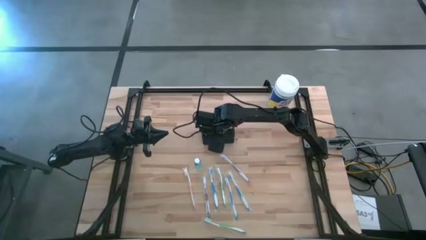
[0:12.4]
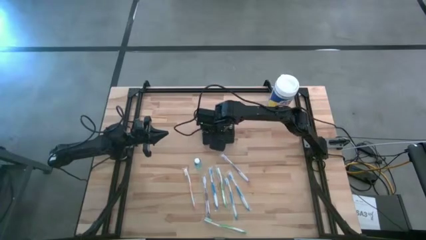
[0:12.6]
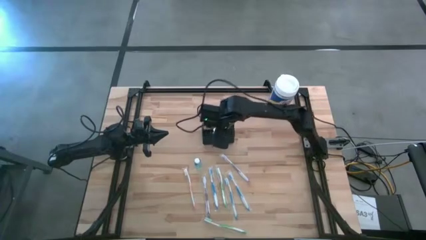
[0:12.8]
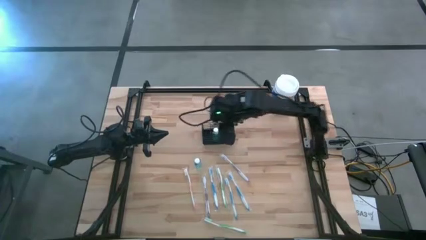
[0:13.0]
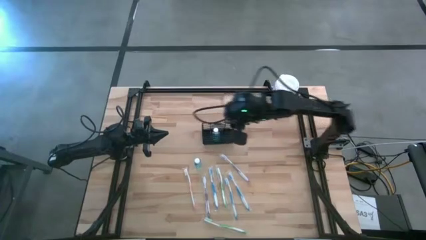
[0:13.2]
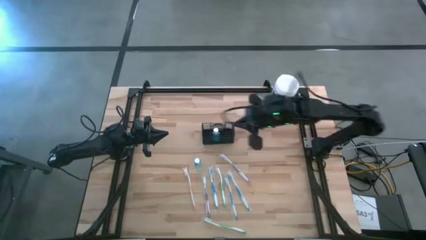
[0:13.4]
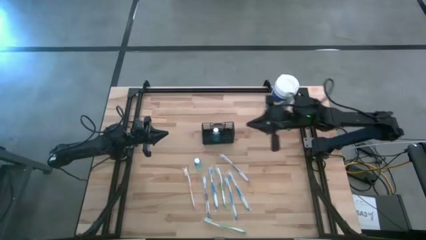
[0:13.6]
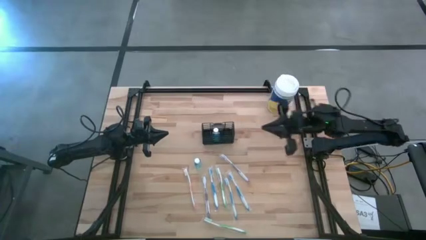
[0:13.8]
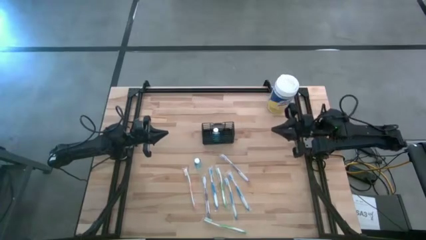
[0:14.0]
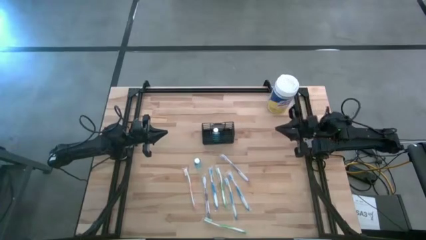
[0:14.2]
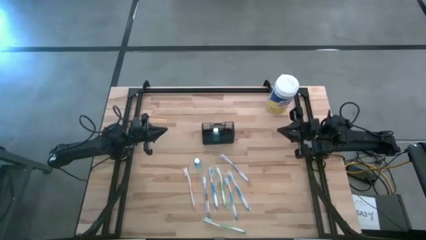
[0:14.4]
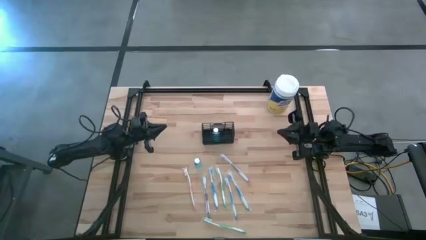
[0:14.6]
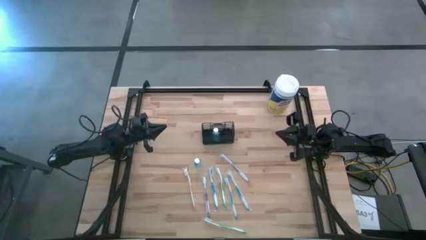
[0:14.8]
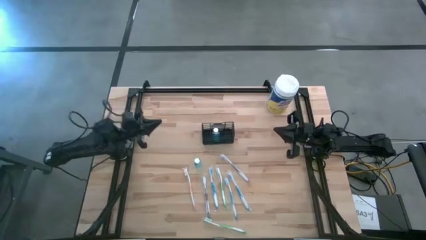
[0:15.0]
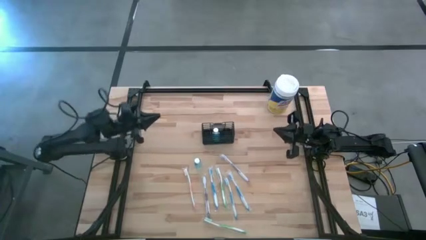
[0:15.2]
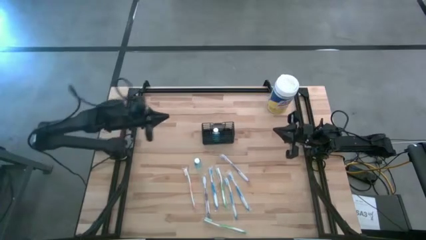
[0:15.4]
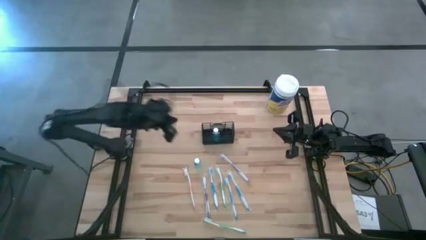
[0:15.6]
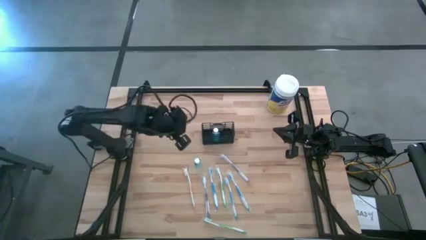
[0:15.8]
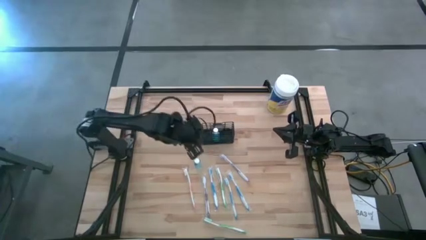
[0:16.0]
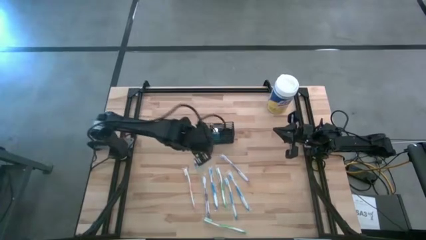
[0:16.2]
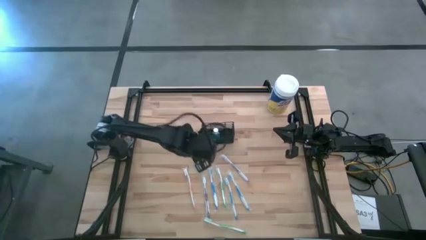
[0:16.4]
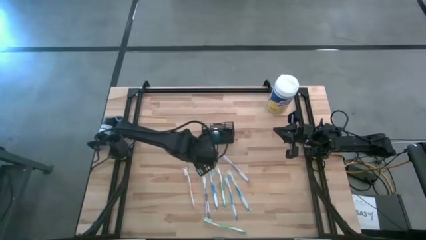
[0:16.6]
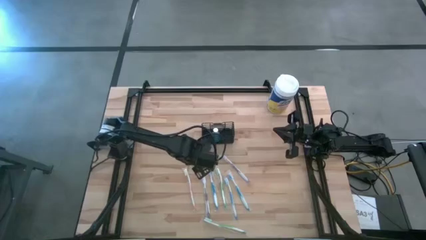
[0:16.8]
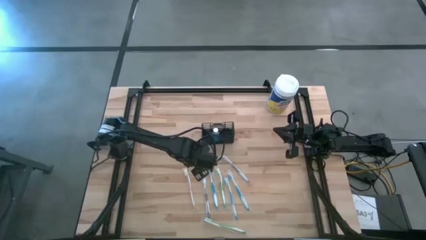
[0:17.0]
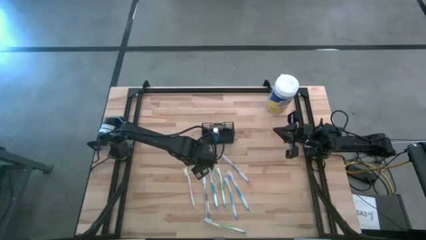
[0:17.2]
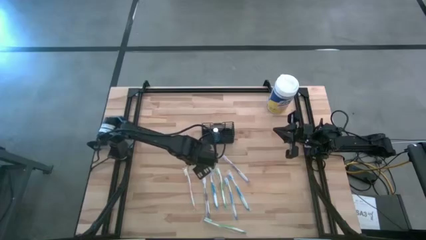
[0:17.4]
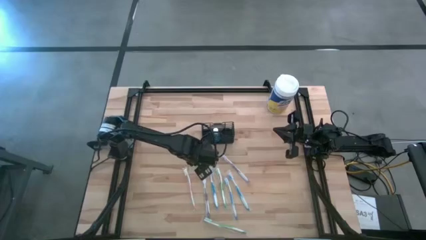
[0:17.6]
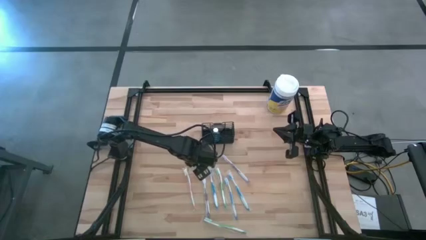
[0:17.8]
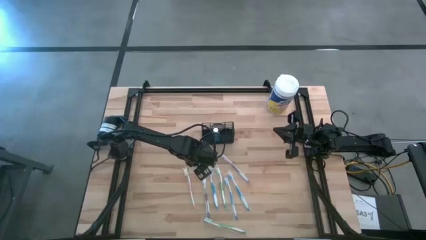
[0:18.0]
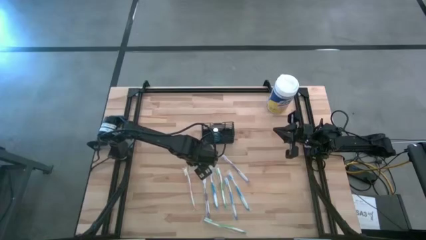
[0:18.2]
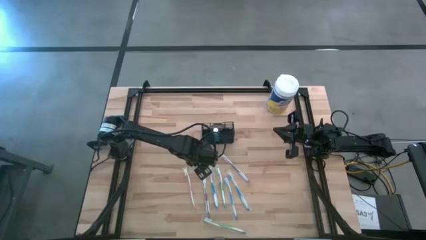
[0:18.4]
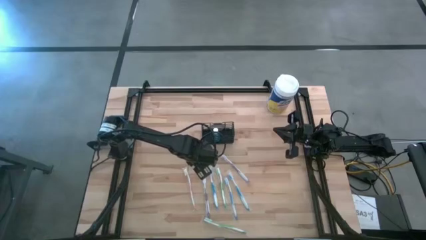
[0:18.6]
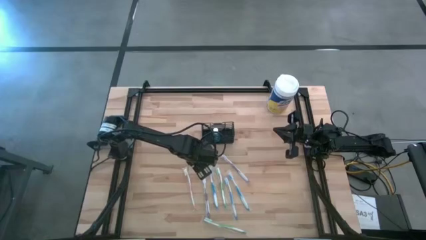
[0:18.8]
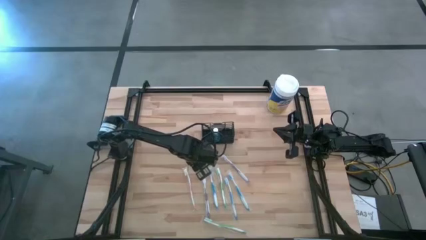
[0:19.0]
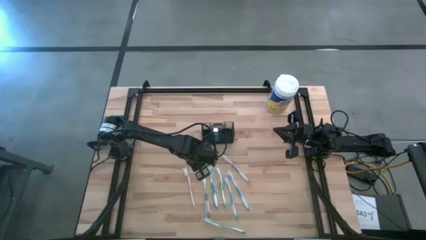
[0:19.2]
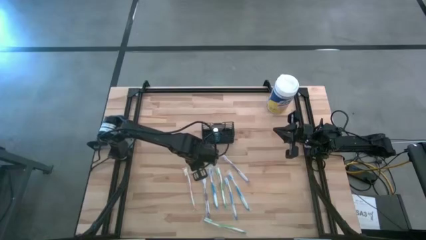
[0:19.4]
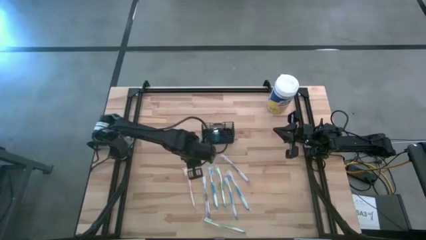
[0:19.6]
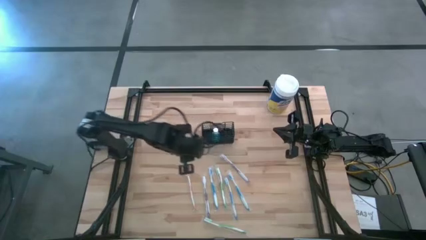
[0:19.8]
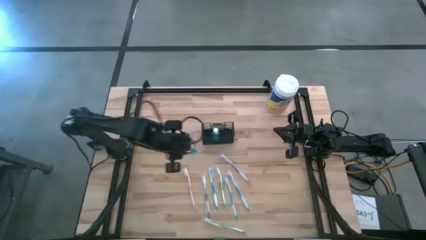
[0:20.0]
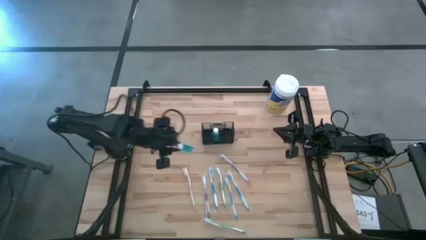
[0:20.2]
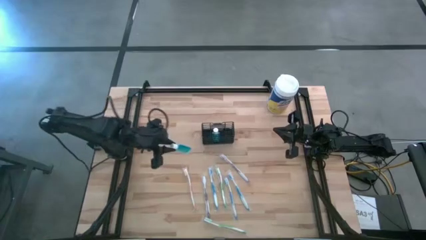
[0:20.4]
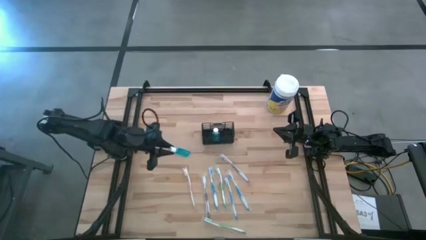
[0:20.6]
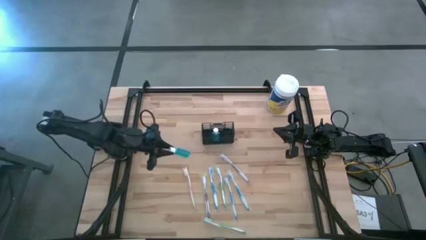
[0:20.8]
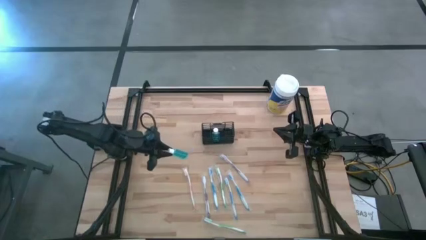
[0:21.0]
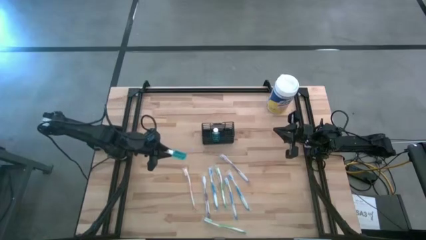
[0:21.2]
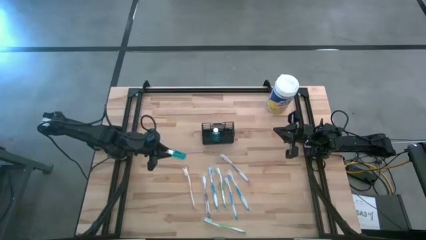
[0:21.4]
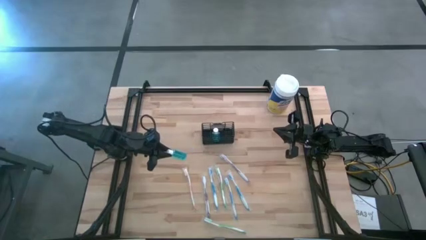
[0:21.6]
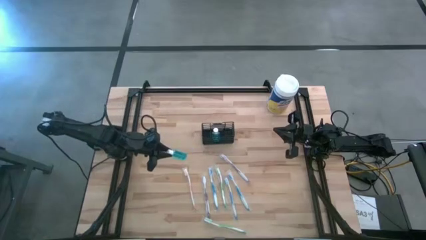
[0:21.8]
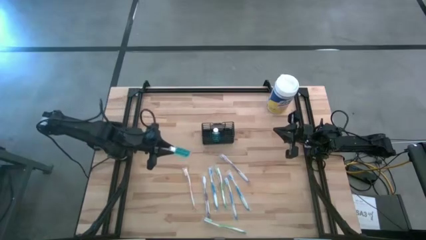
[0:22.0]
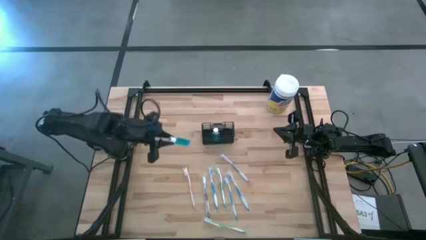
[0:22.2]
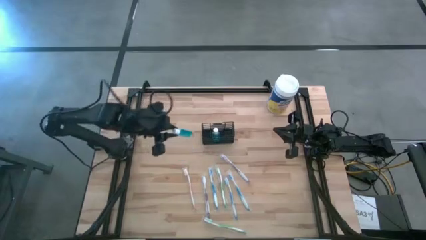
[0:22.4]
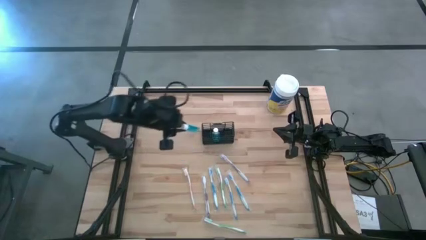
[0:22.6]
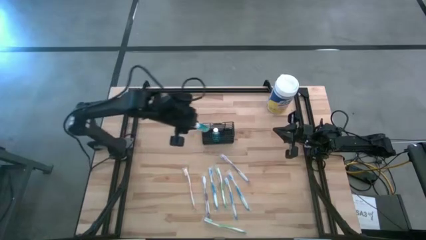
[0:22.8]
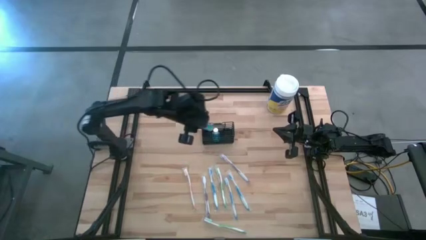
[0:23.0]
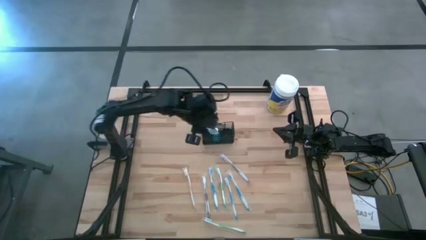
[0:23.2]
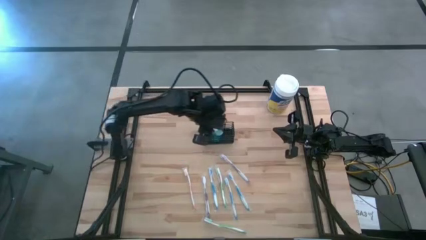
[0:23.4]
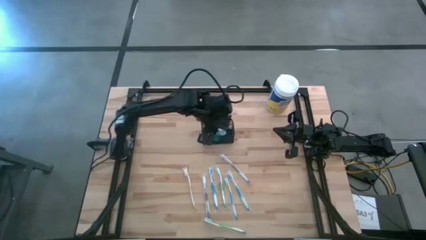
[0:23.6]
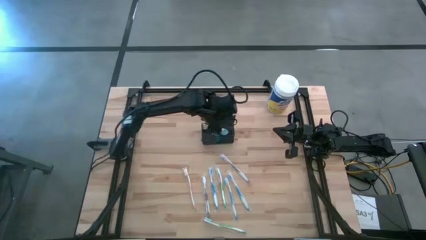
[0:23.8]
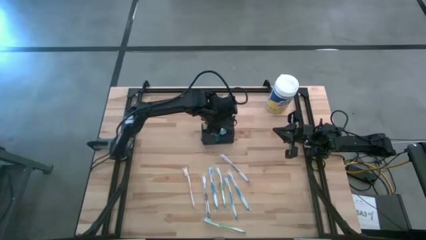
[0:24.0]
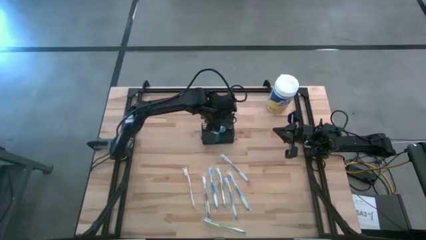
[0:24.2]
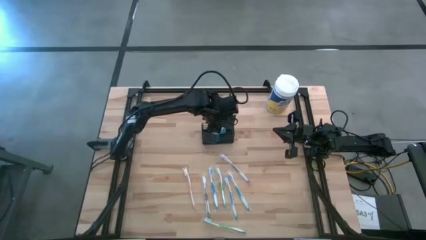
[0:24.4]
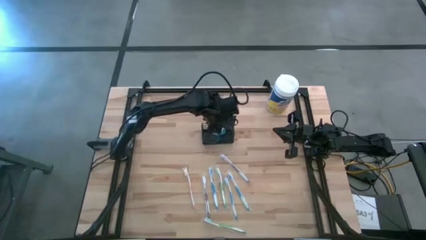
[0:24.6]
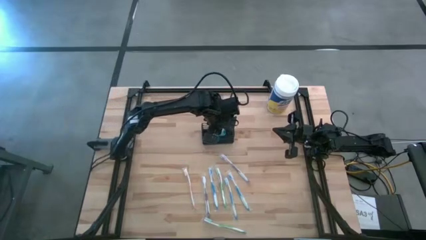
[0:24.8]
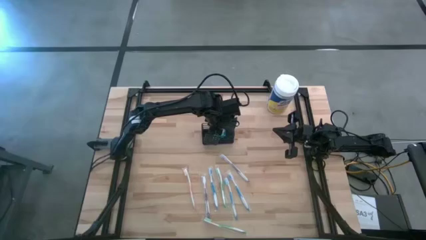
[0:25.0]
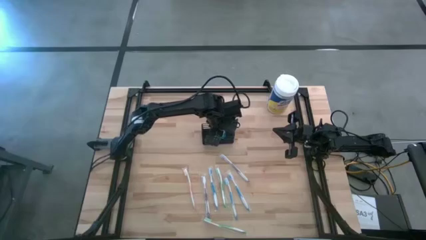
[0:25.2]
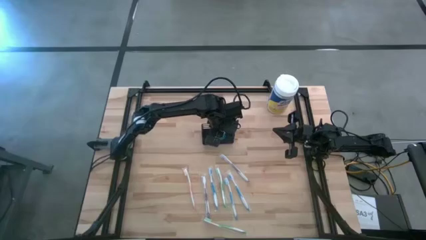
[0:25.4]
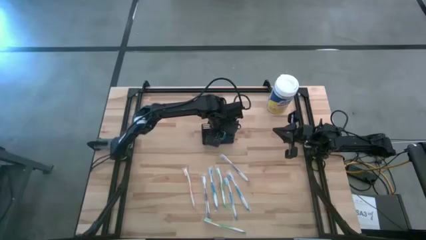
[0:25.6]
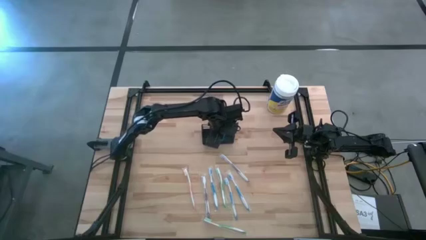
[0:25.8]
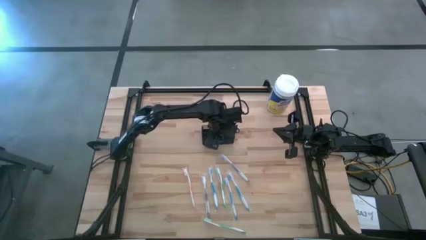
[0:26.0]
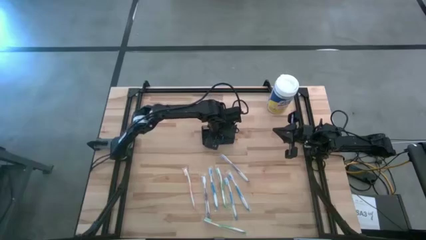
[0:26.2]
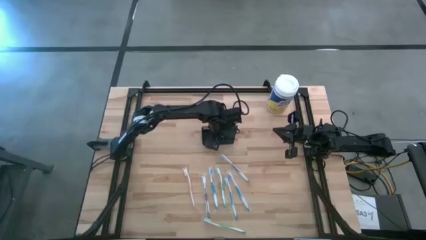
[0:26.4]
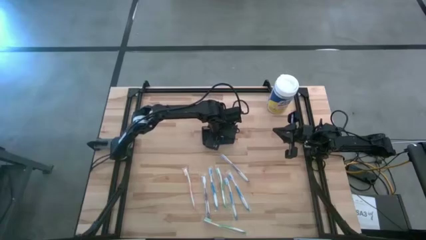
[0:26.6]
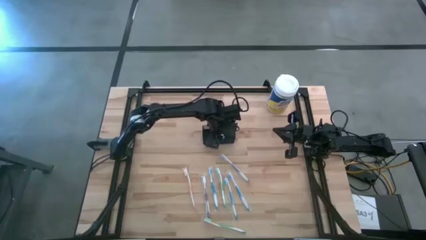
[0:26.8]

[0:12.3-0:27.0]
Task: Pick & Place toothbrushing station
Put the mouthwash into the mesh organizer
